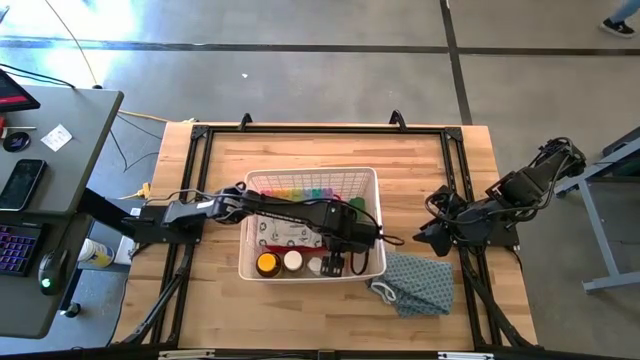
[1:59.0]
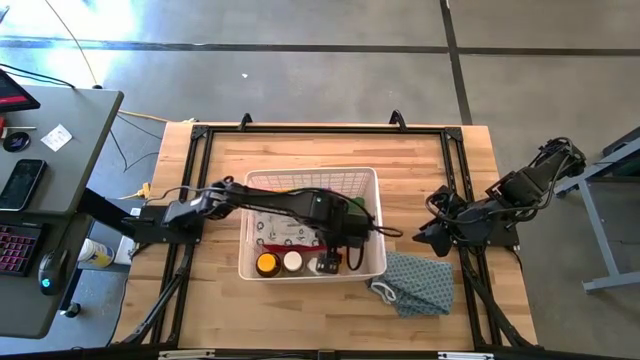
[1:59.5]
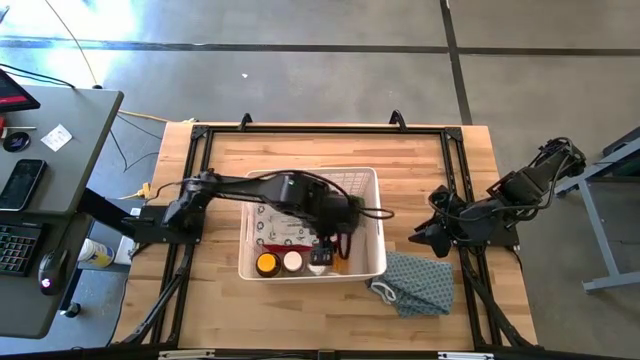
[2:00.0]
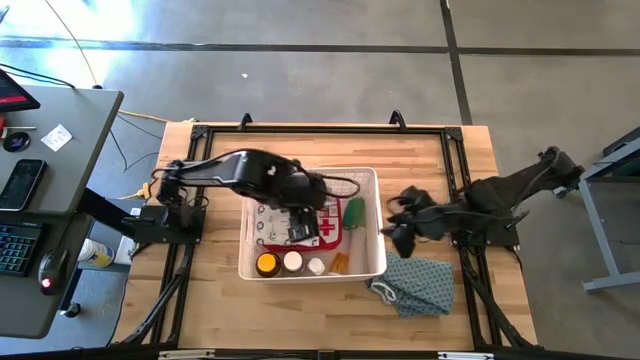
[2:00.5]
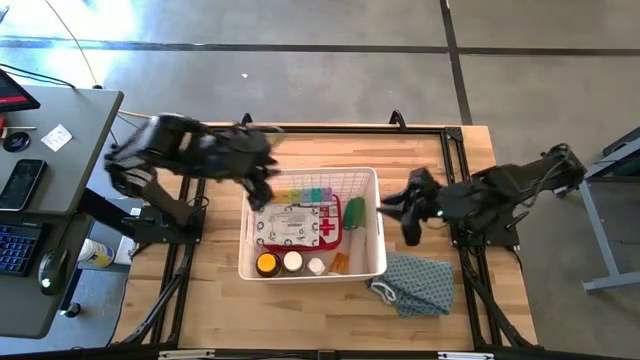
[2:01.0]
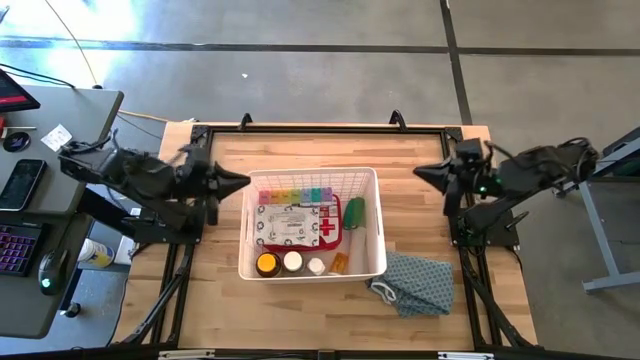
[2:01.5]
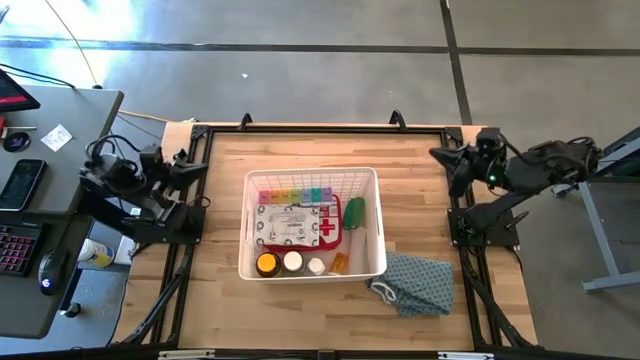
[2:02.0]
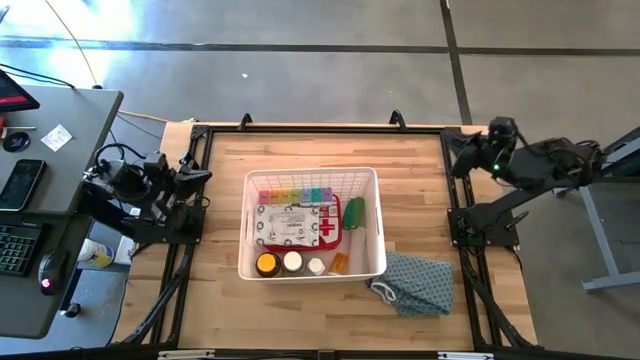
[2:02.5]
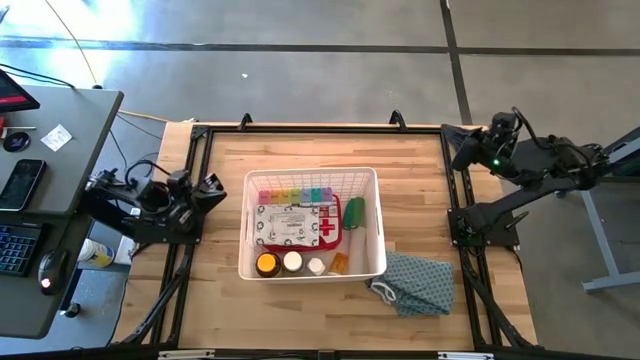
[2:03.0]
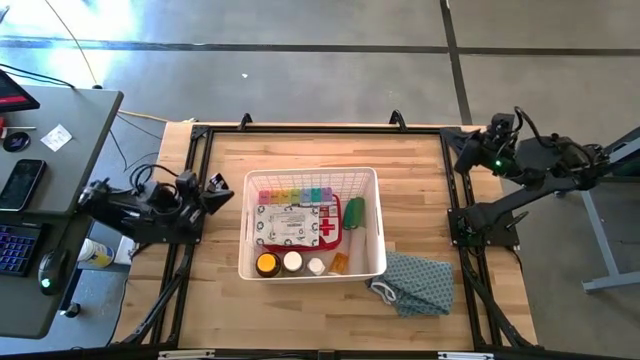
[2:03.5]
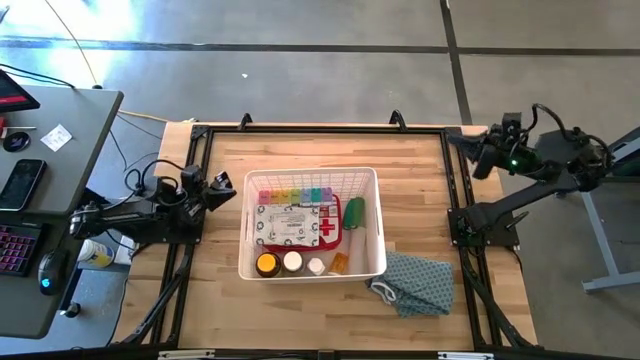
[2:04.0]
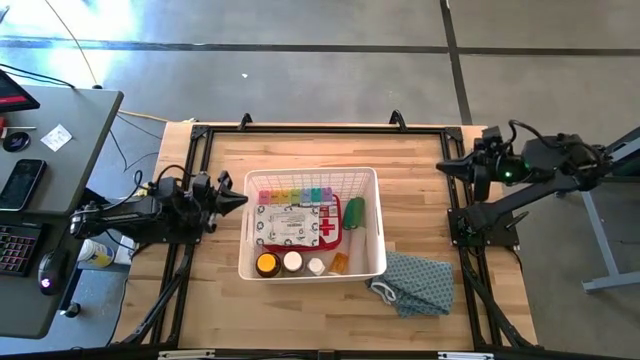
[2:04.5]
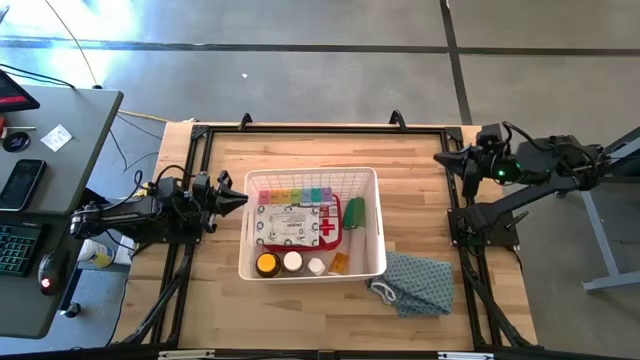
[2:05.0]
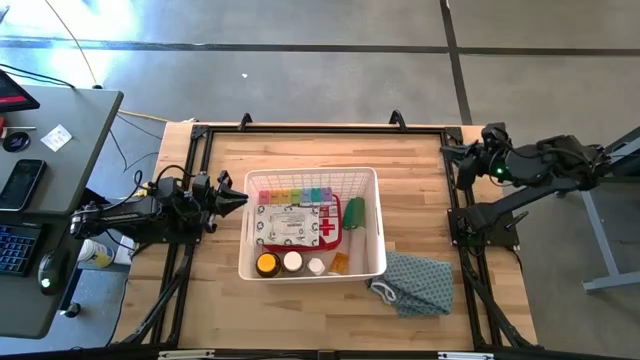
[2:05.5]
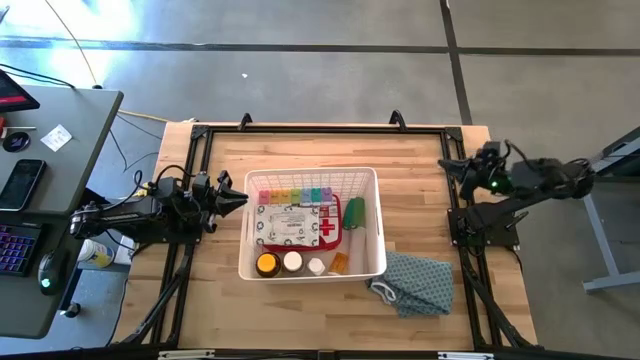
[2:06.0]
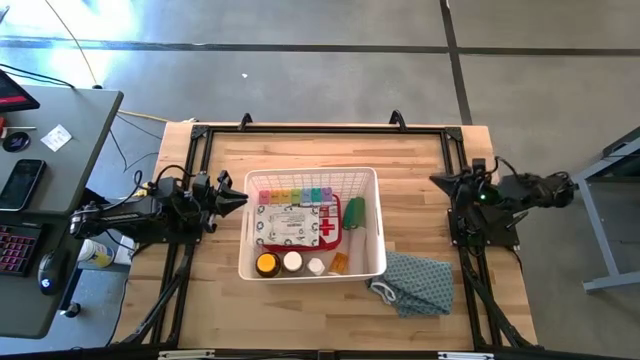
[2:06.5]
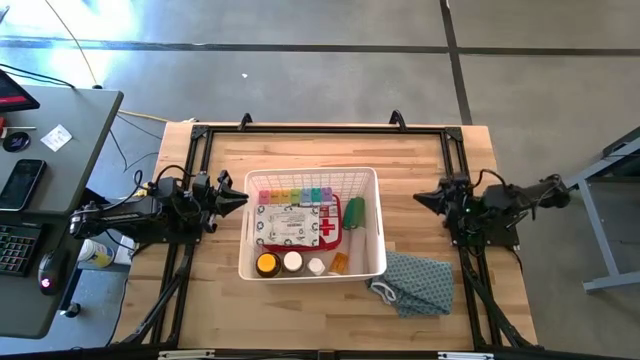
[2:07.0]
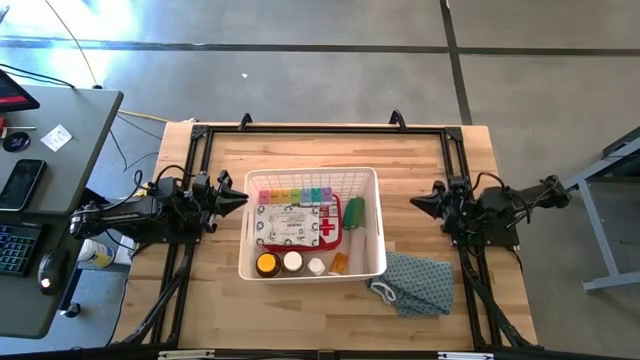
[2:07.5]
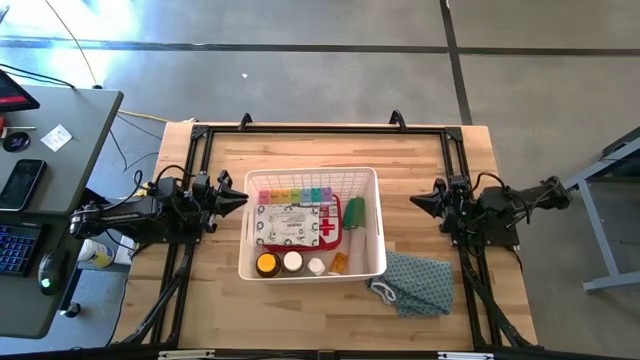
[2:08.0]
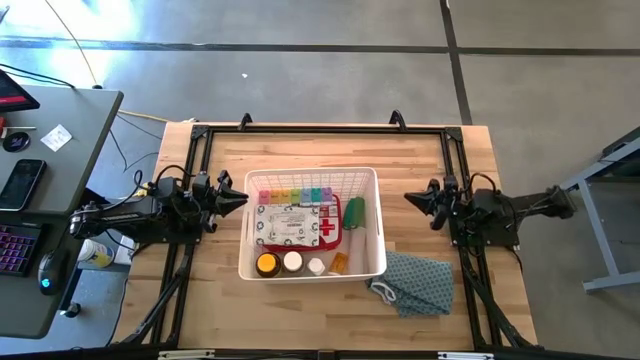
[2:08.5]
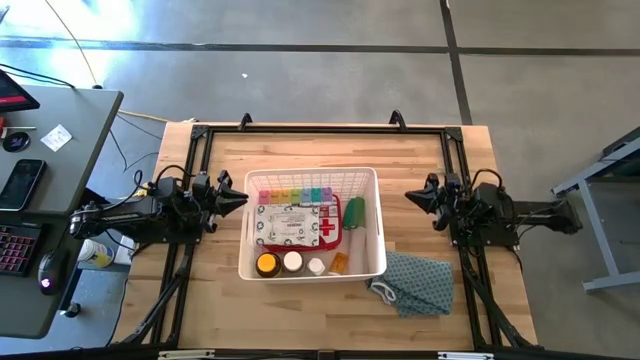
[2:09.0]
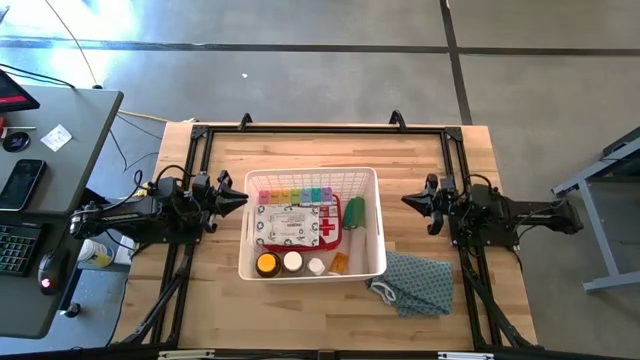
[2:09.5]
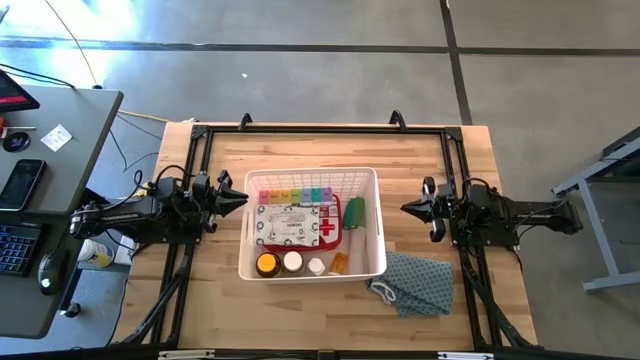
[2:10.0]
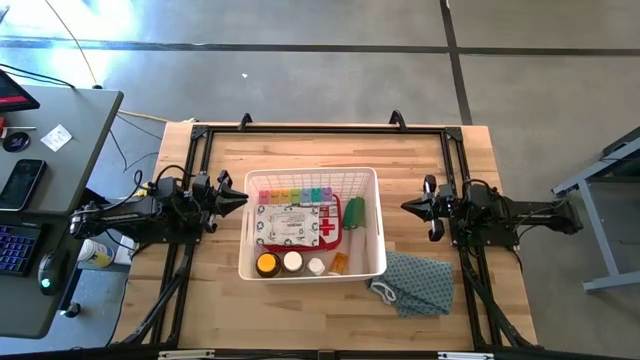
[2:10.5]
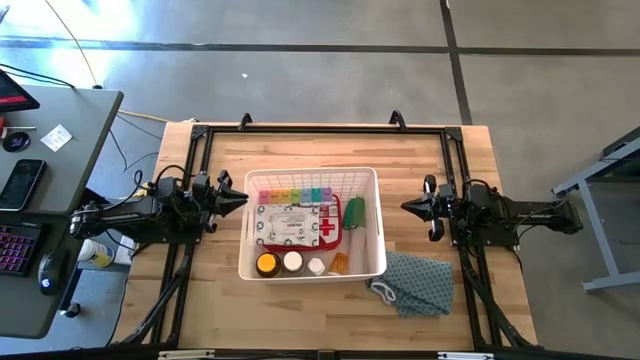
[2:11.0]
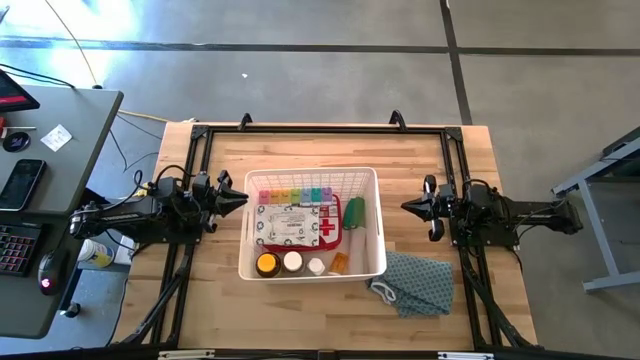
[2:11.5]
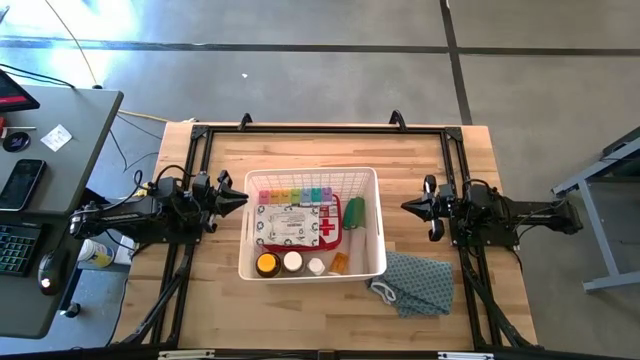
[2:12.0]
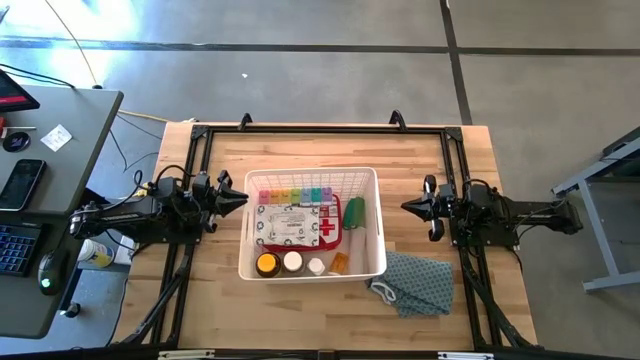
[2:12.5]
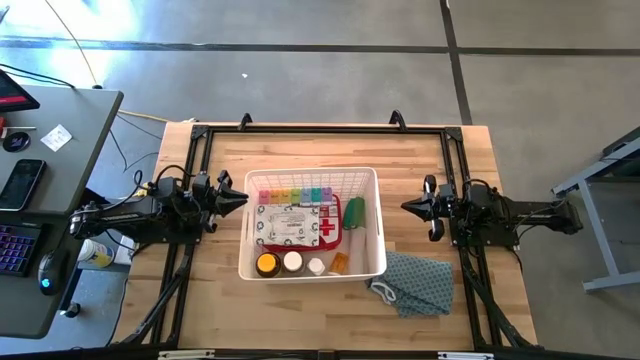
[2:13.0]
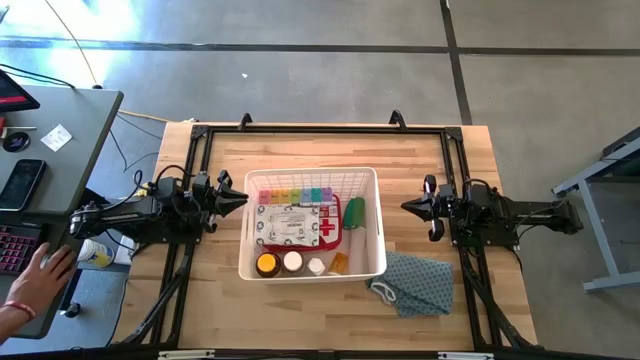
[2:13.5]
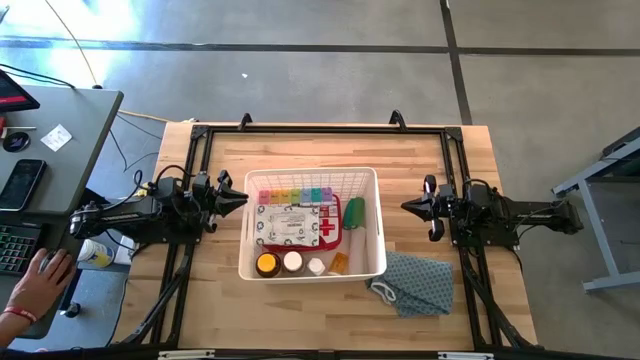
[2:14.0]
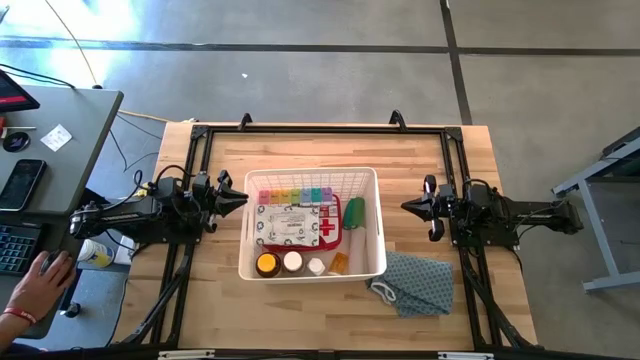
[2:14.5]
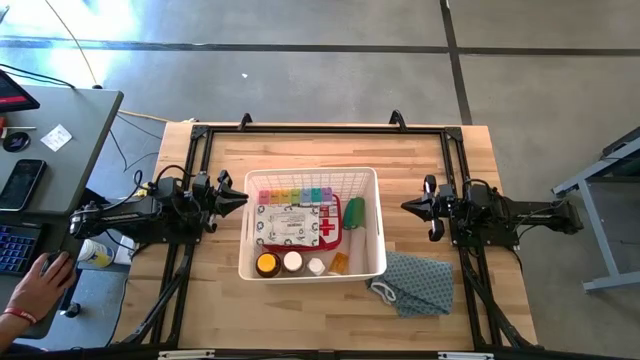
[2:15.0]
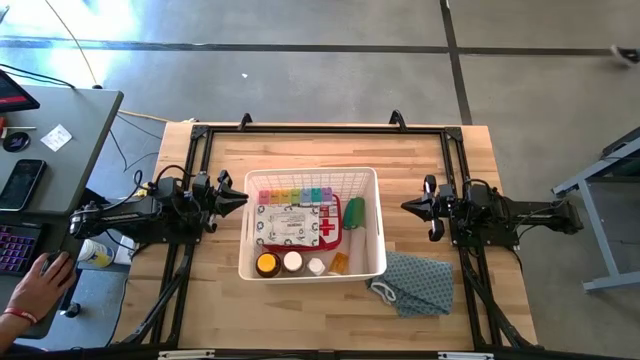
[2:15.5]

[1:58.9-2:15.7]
Task: Pick & place medical supplies in basket/bin
Return to Home Position

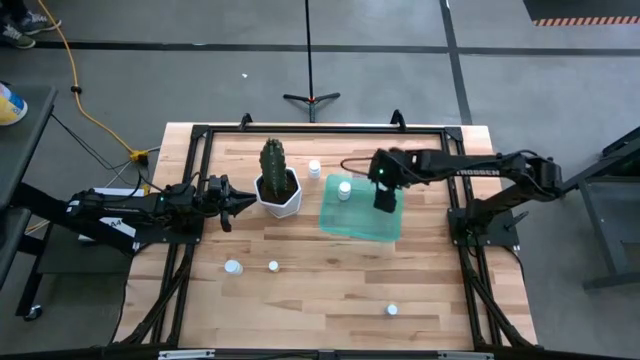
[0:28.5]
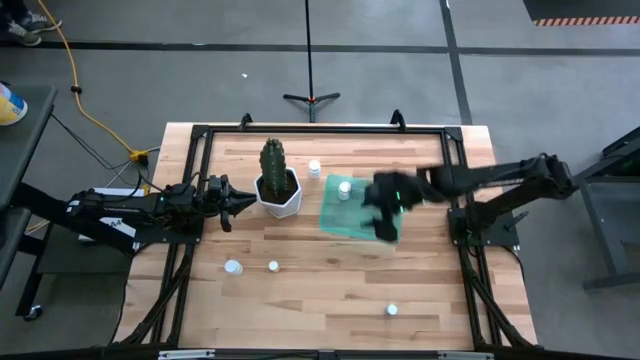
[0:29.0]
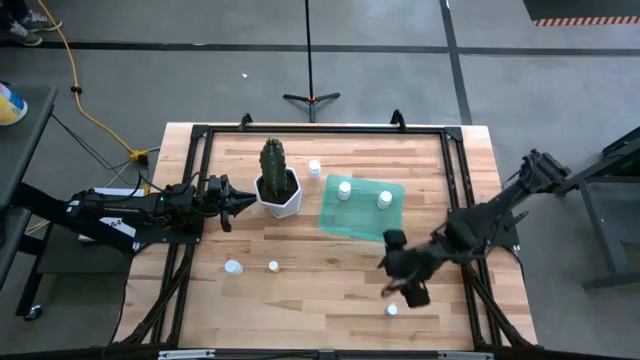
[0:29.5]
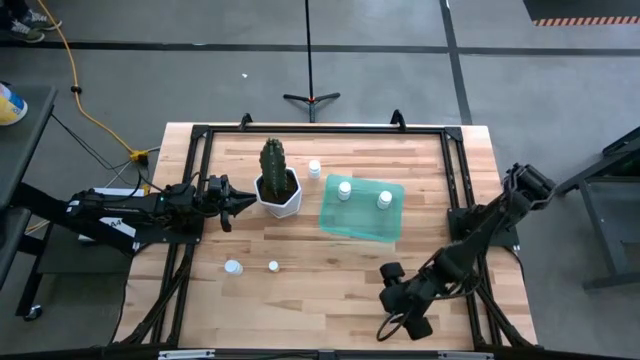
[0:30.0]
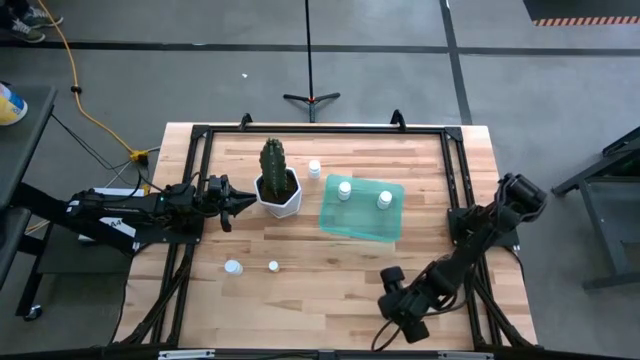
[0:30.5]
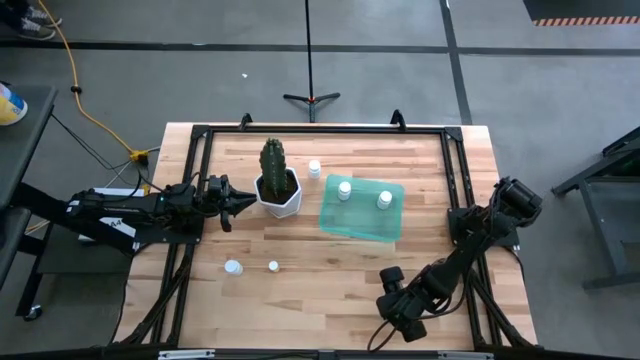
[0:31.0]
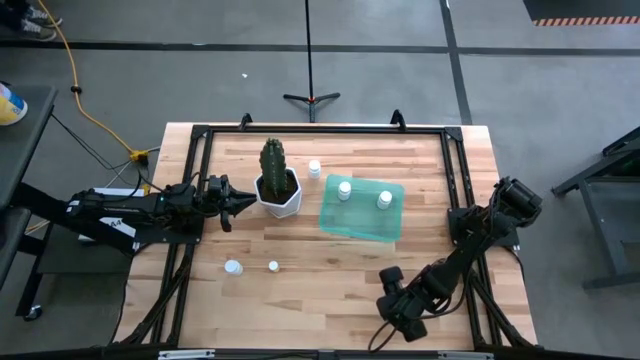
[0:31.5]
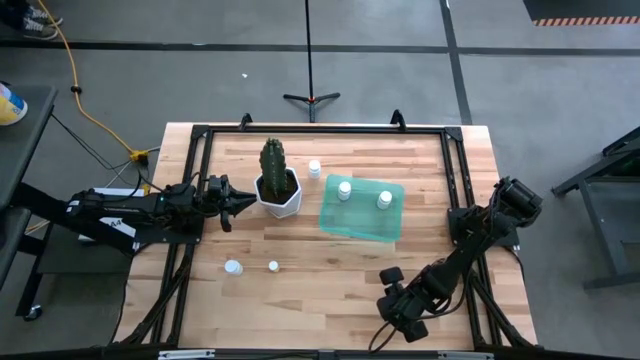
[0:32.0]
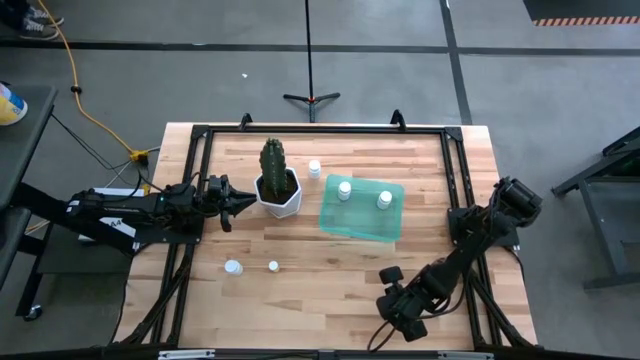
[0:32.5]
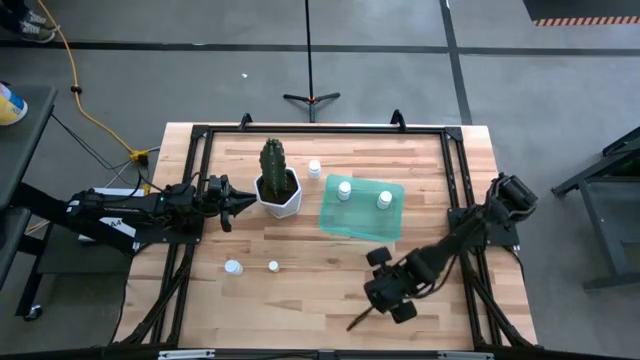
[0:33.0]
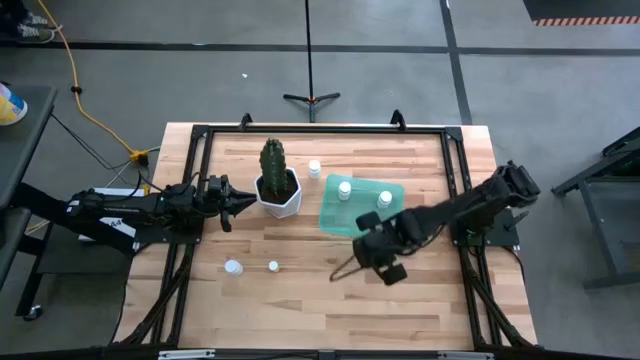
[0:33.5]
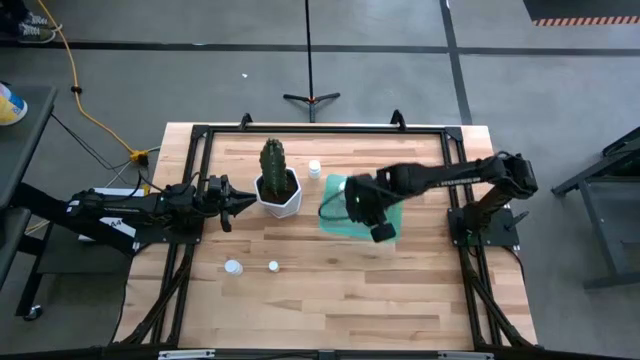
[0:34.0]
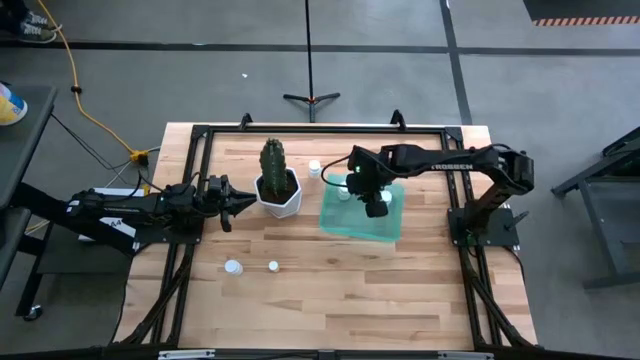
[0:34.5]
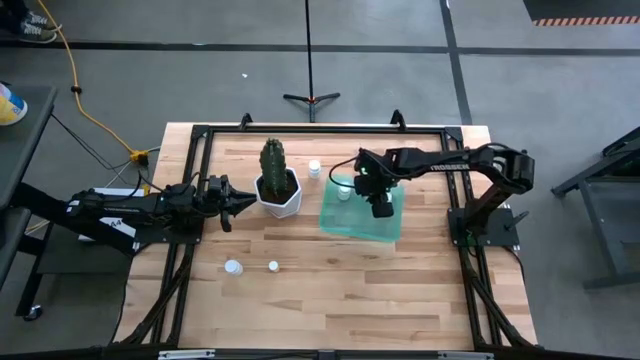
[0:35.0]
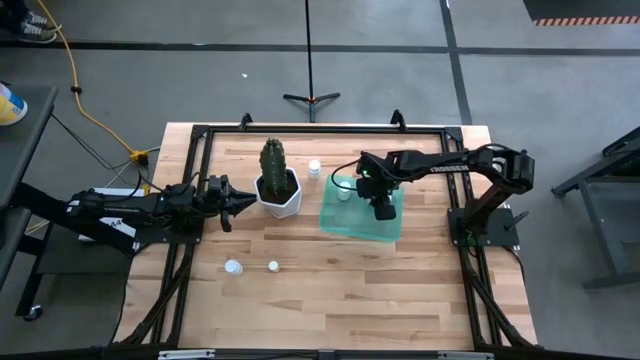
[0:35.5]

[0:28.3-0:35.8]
Task: Pick and place pill bottles into a basket
Put the light blue pill bottle into the light green bin
